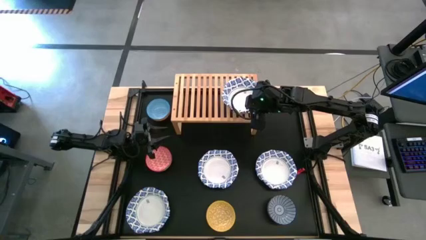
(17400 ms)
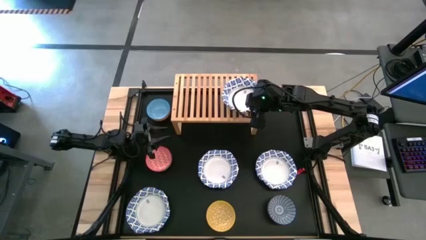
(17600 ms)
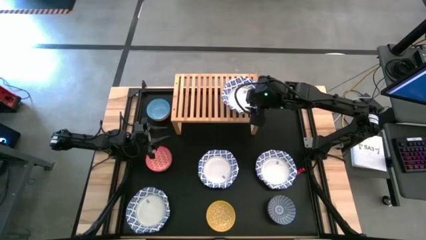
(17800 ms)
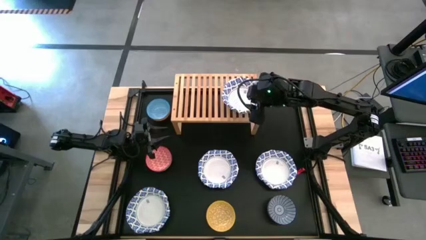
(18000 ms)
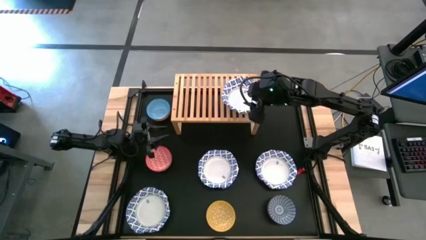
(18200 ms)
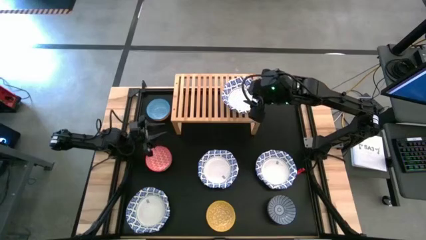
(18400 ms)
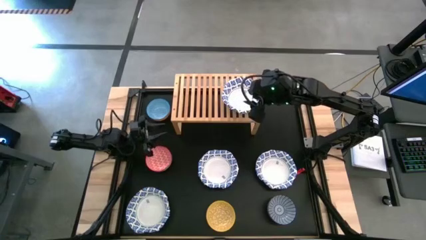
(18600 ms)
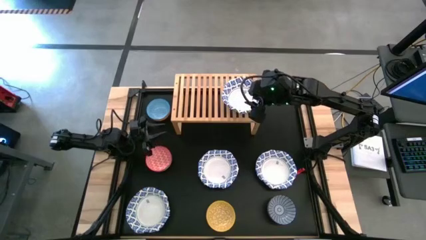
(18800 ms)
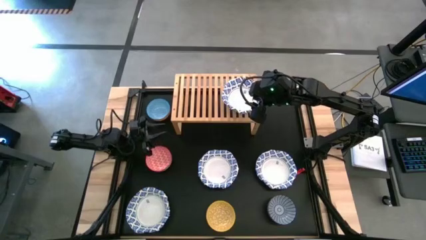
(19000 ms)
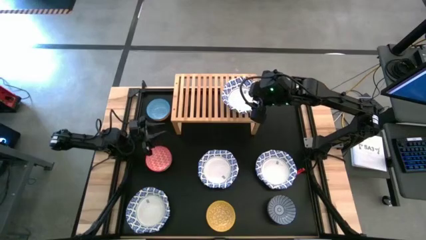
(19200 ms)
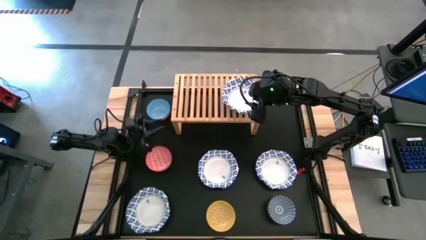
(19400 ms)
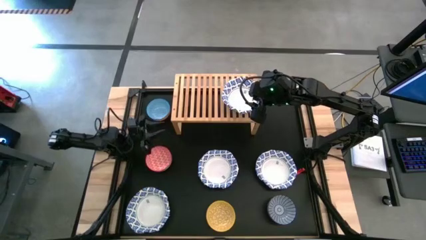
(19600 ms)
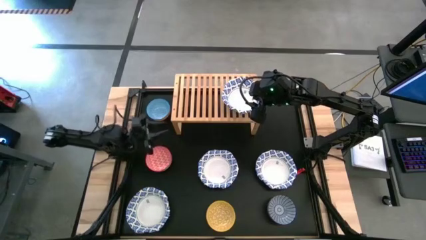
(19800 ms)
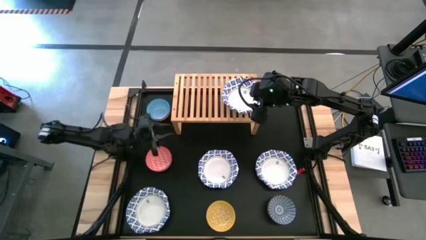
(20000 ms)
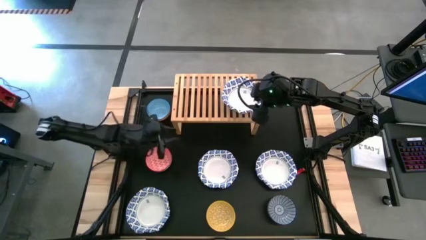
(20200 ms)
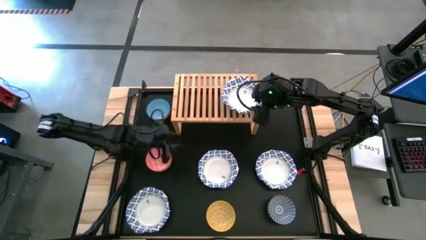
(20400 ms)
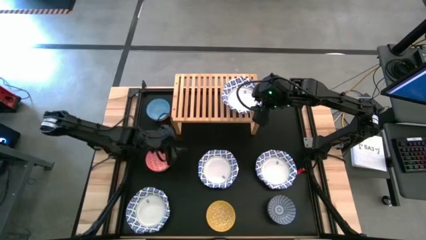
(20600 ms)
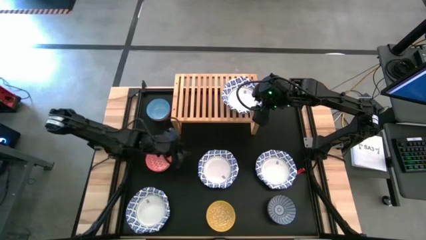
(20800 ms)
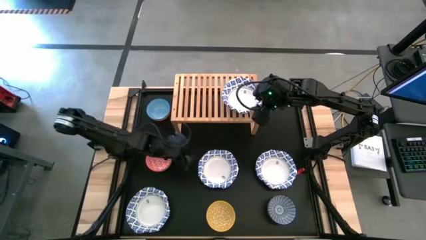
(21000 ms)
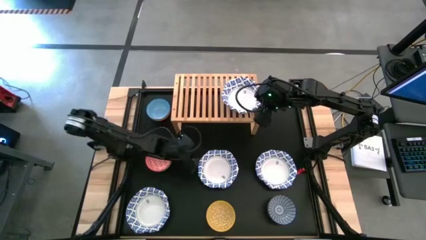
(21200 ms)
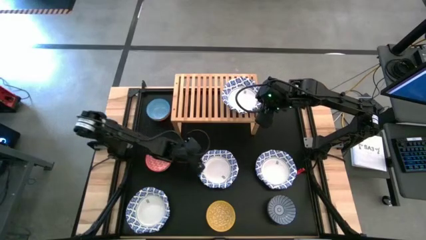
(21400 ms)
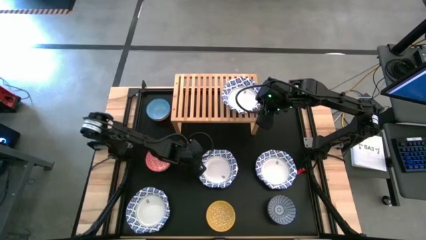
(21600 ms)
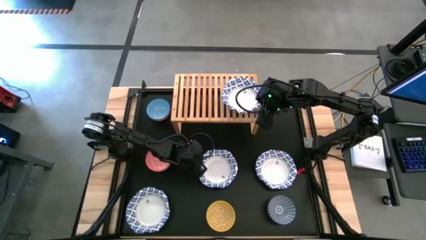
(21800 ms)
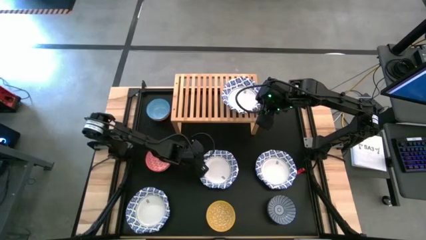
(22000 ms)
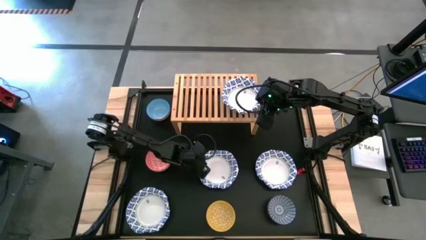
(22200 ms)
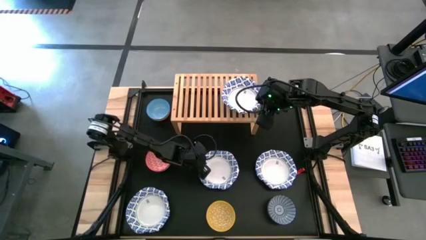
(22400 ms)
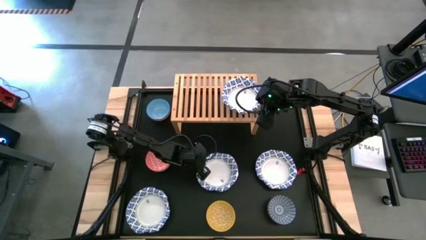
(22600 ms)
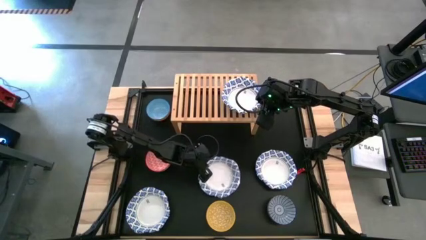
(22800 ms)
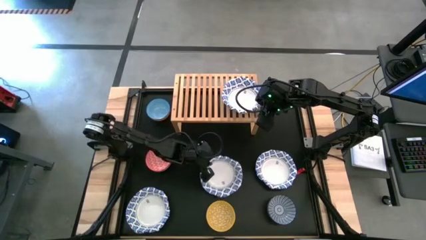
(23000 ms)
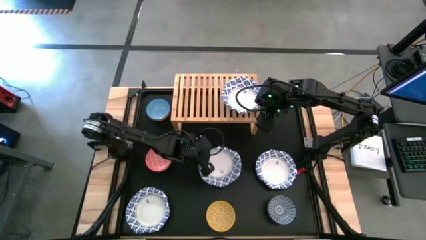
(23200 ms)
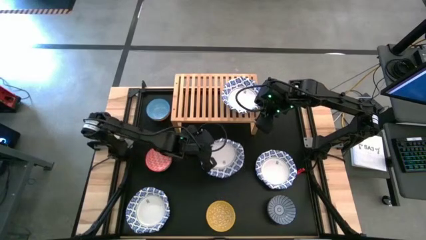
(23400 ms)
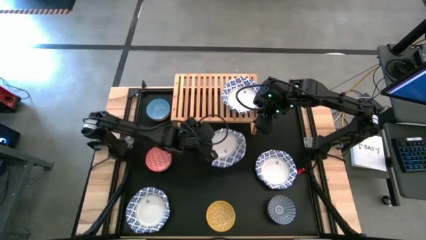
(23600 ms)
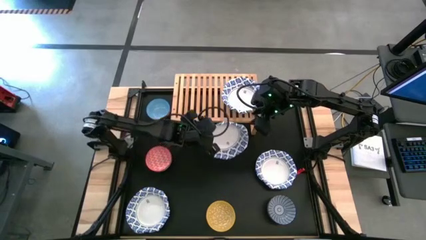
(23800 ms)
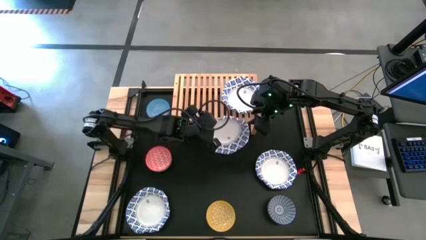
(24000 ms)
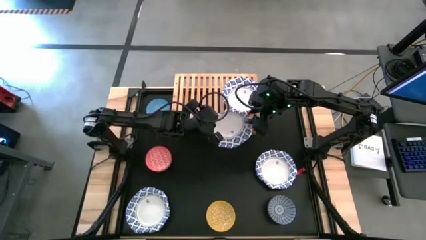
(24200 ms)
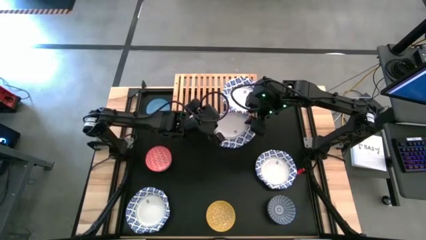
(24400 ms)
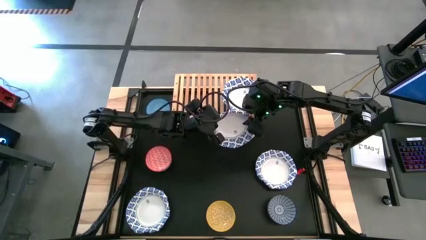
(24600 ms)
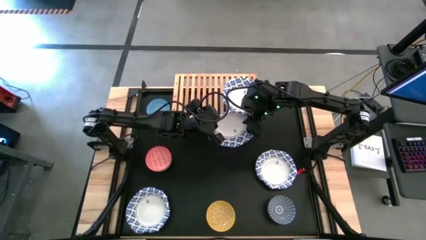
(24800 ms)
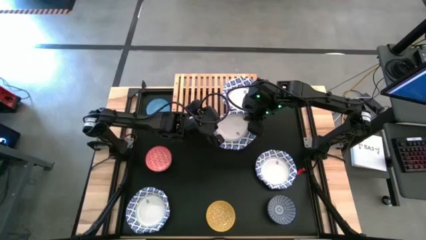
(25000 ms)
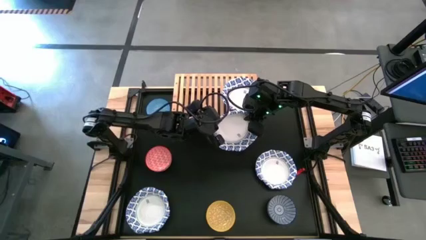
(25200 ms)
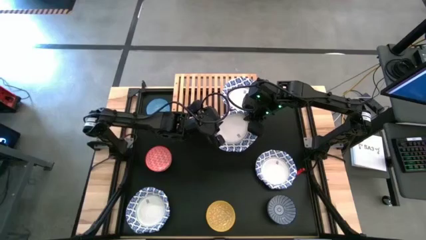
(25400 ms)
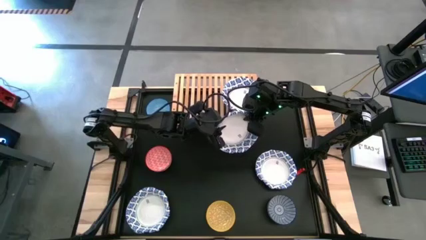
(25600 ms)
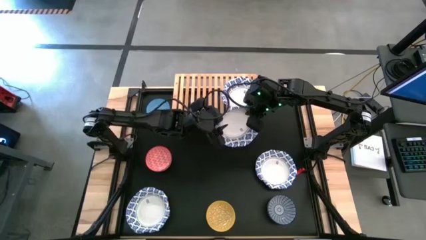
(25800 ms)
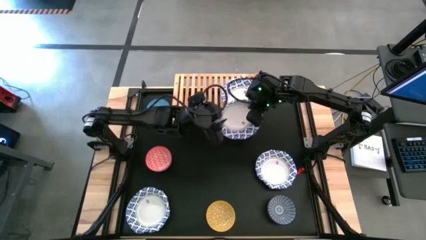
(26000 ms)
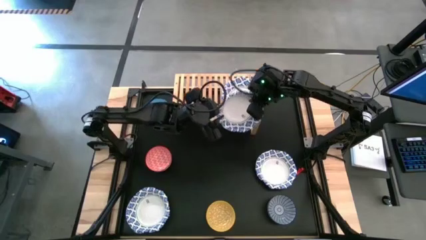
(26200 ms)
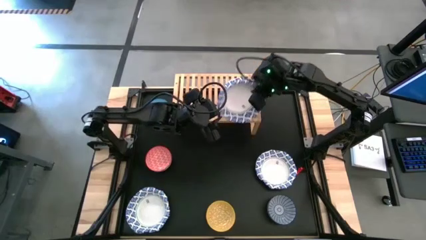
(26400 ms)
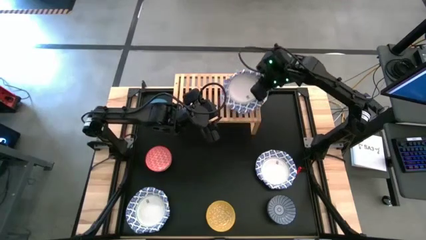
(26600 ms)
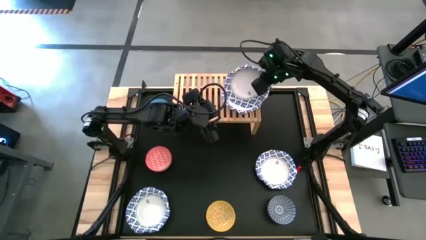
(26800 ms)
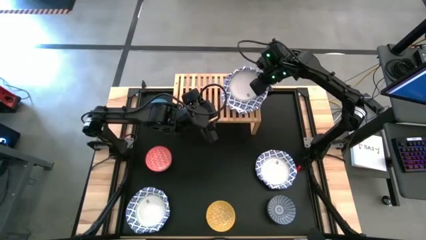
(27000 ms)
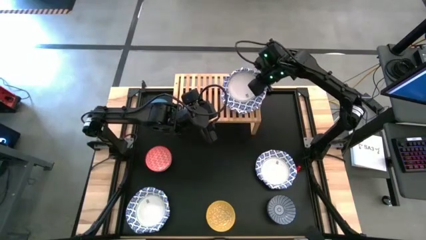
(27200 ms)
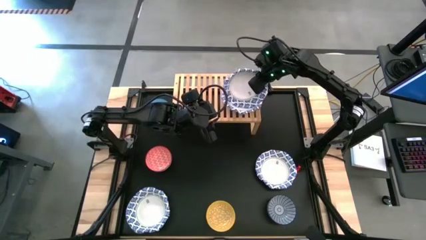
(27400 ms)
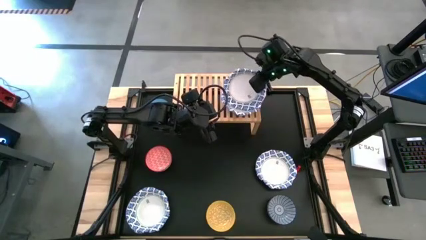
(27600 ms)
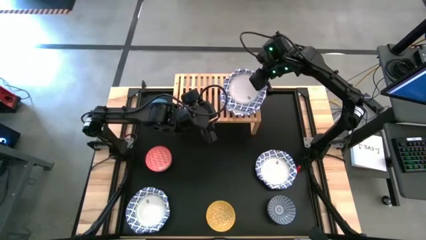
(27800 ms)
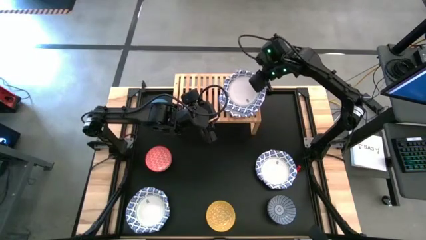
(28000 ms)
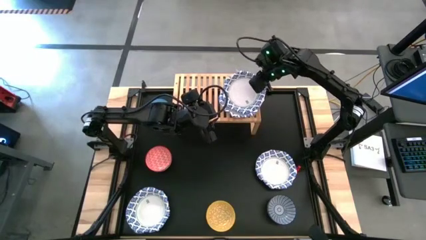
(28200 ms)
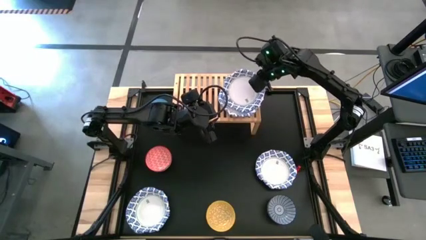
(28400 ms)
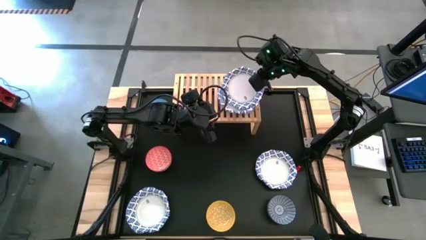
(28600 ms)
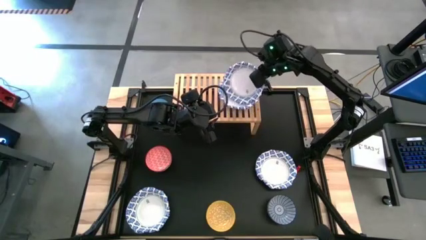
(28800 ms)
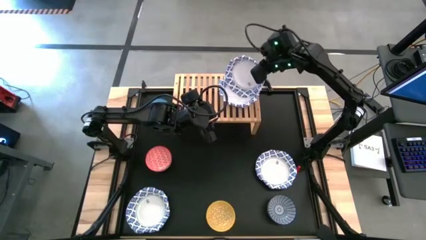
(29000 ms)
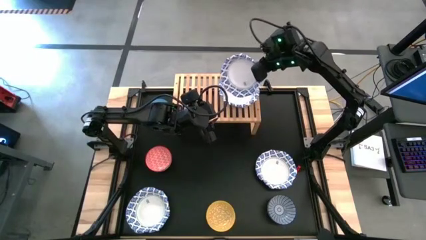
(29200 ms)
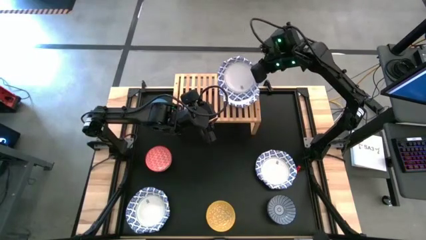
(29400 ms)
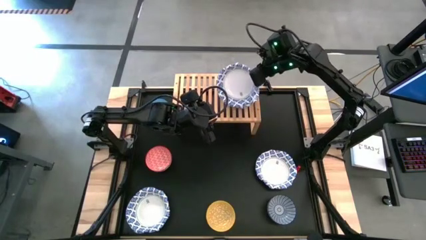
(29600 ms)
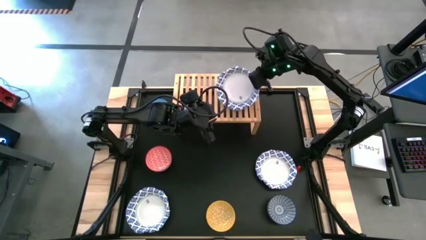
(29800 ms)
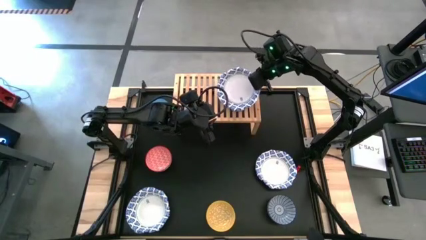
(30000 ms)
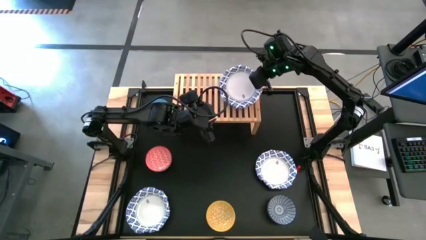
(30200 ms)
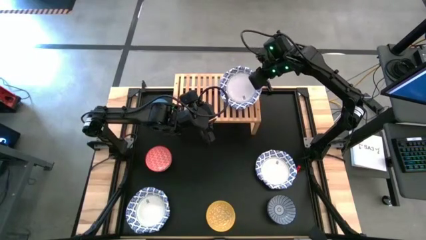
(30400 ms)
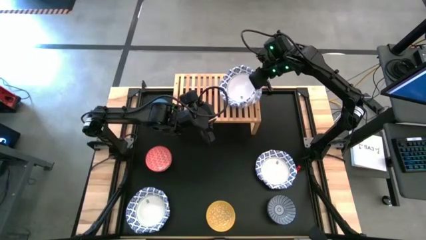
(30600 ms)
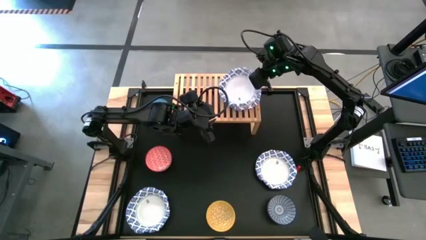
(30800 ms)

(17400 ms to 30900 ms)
Task: Place and stack bowls onto a shelf
Stack the white patterned bowl on top of the other white patterned bowl on the shelf
